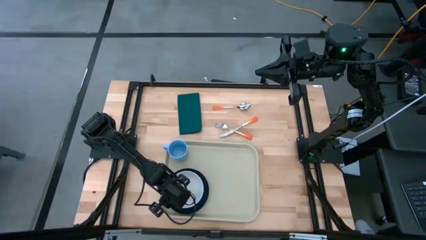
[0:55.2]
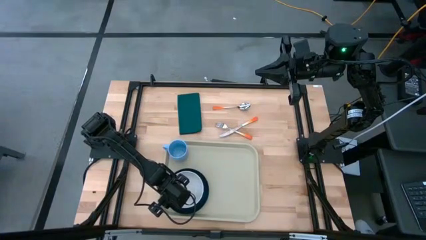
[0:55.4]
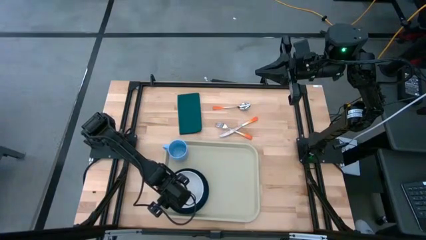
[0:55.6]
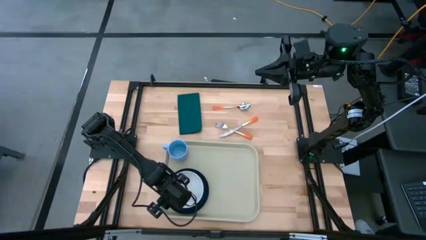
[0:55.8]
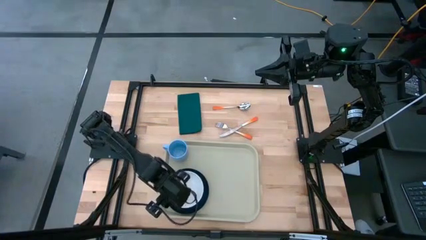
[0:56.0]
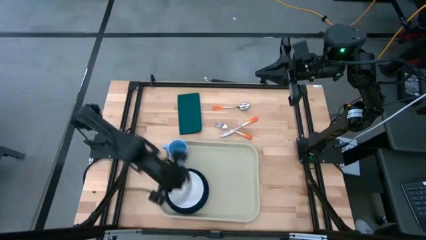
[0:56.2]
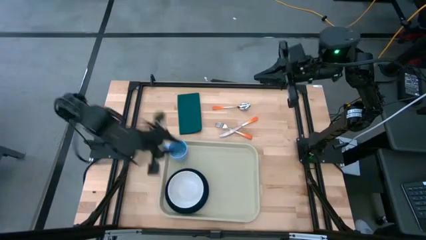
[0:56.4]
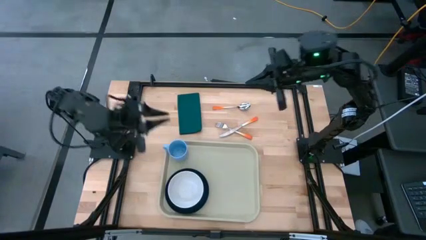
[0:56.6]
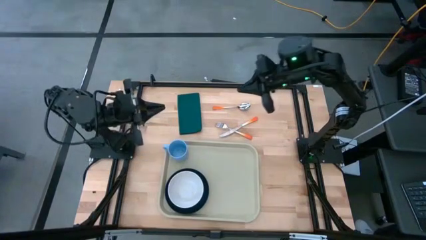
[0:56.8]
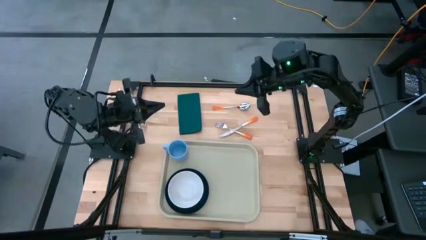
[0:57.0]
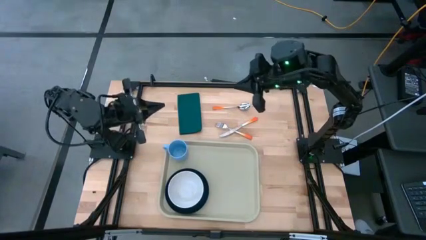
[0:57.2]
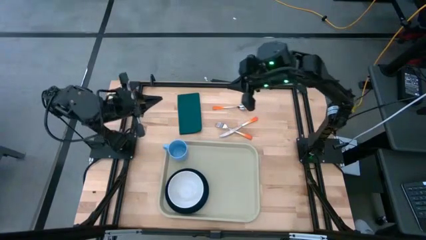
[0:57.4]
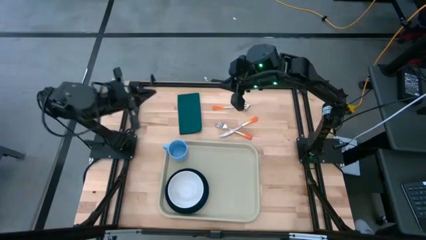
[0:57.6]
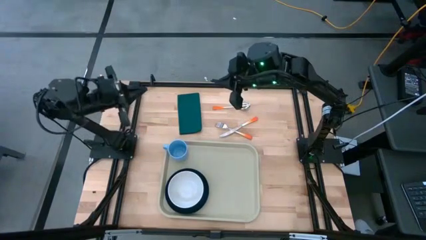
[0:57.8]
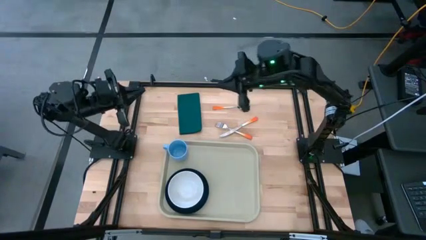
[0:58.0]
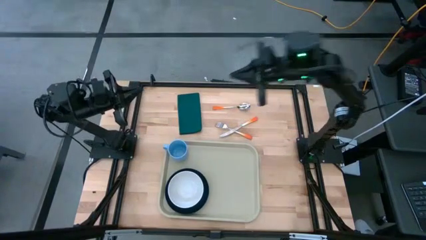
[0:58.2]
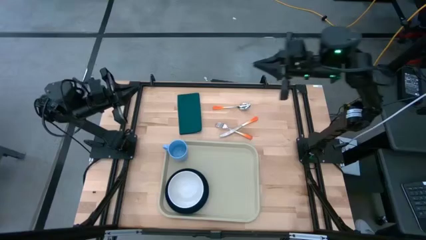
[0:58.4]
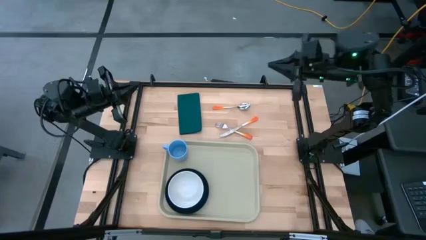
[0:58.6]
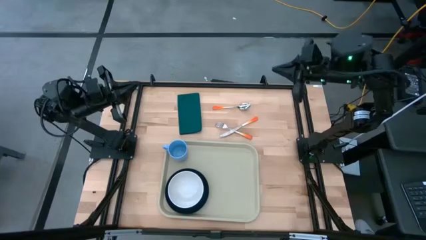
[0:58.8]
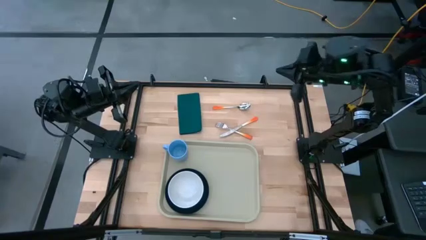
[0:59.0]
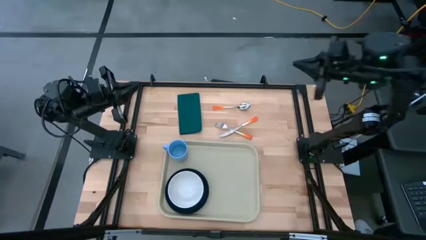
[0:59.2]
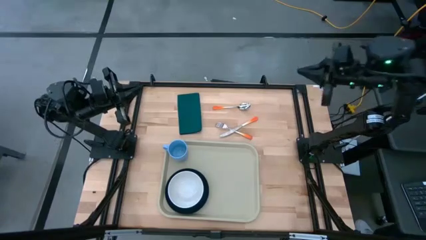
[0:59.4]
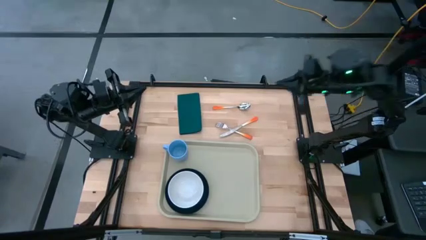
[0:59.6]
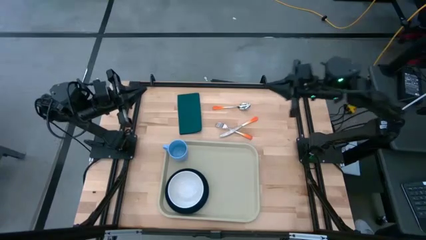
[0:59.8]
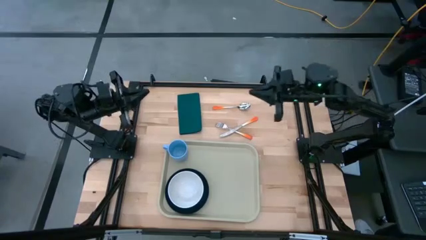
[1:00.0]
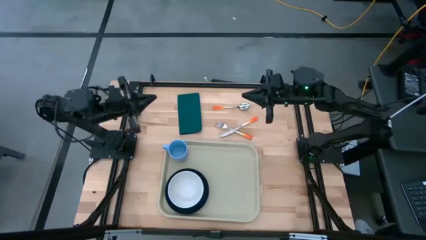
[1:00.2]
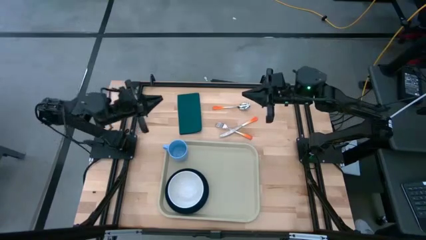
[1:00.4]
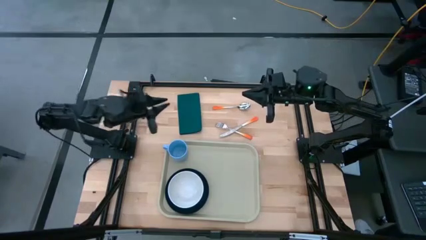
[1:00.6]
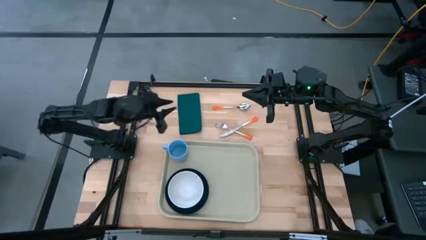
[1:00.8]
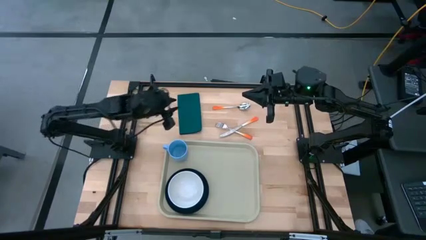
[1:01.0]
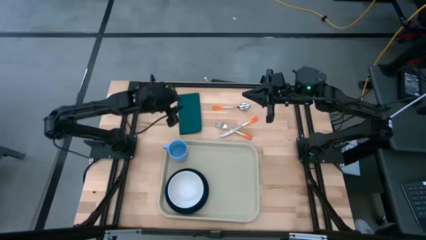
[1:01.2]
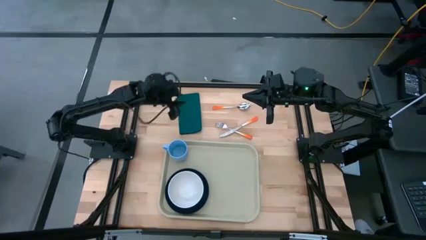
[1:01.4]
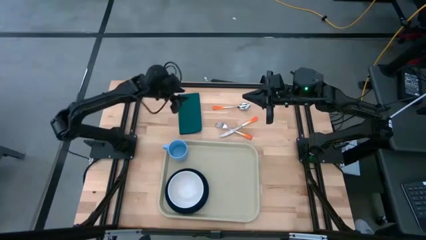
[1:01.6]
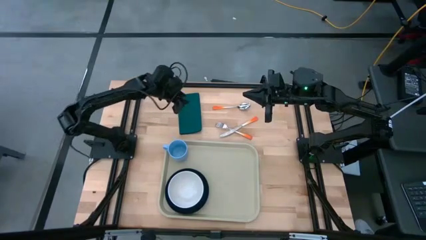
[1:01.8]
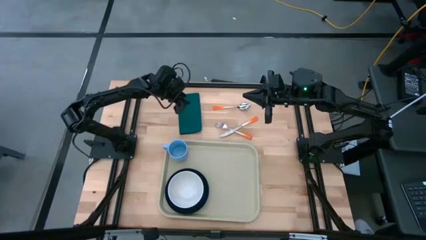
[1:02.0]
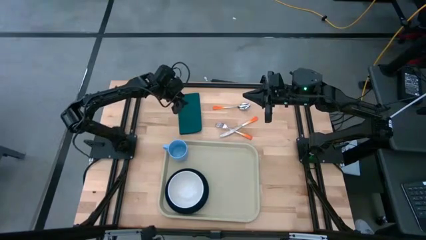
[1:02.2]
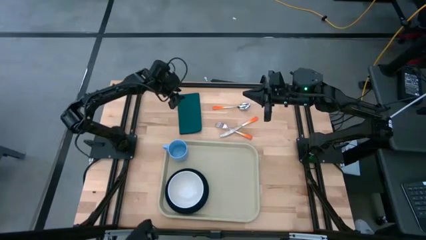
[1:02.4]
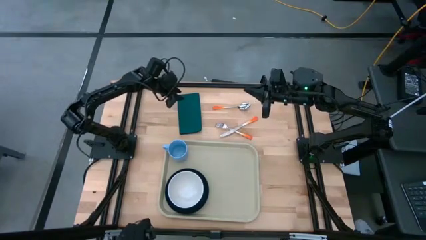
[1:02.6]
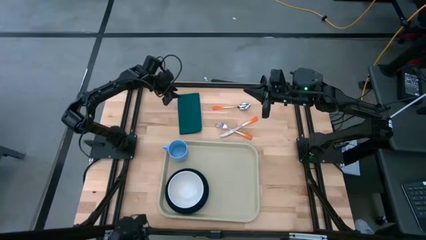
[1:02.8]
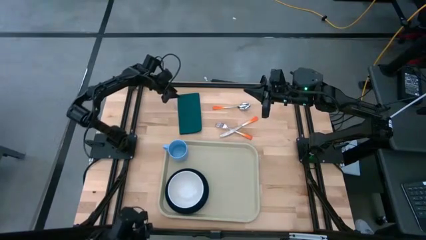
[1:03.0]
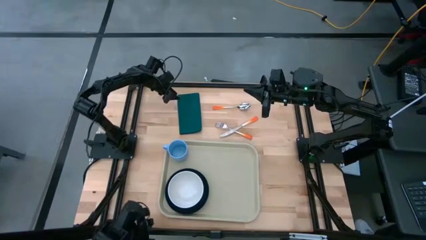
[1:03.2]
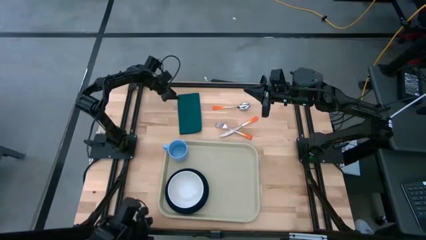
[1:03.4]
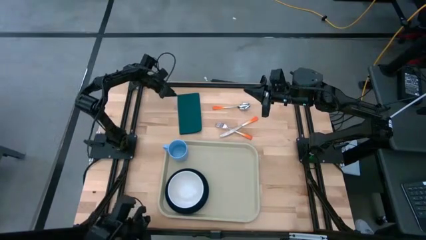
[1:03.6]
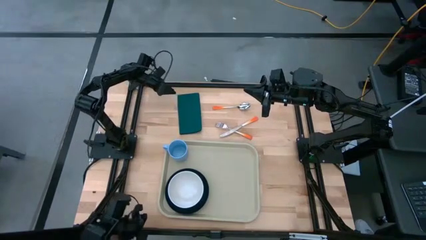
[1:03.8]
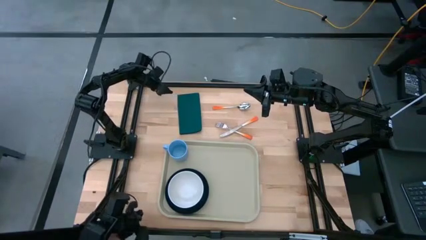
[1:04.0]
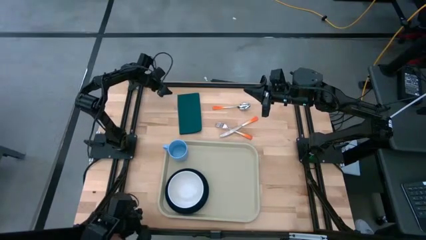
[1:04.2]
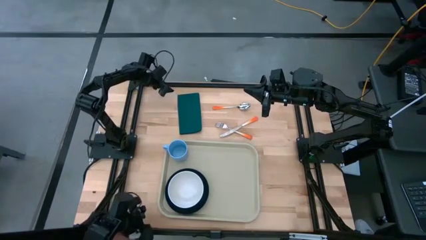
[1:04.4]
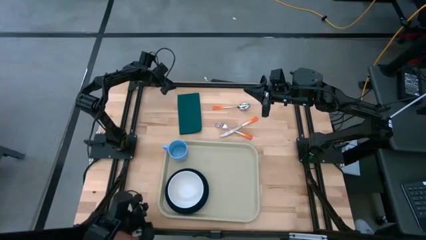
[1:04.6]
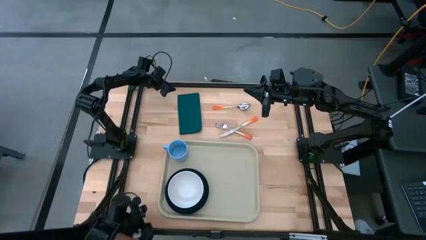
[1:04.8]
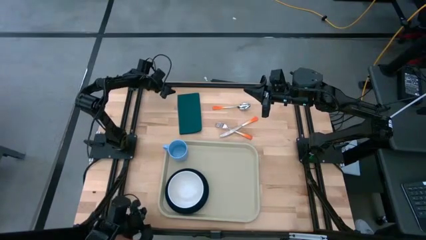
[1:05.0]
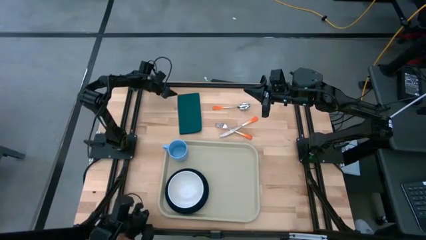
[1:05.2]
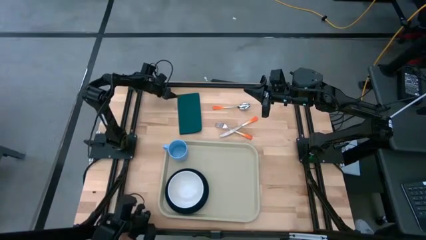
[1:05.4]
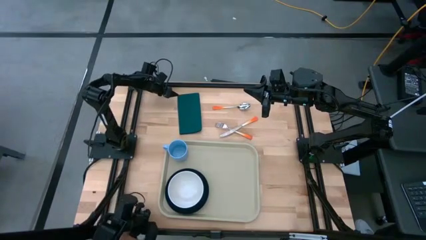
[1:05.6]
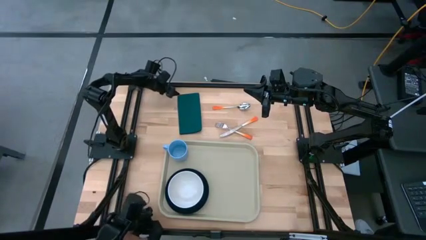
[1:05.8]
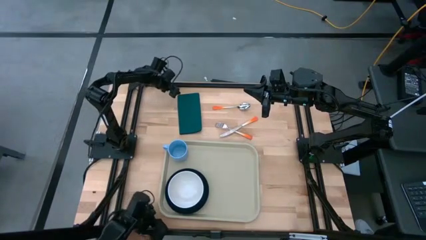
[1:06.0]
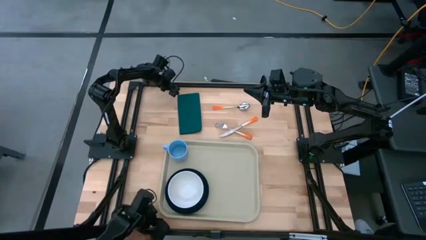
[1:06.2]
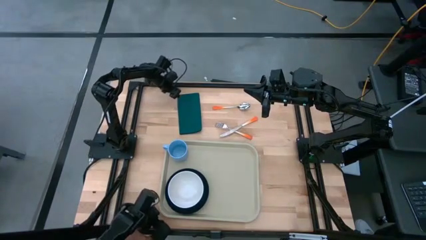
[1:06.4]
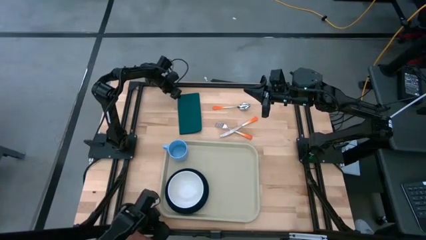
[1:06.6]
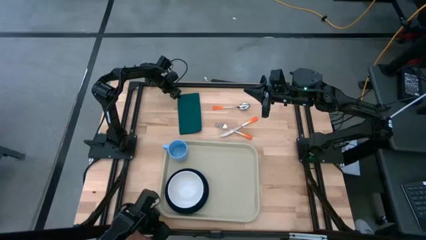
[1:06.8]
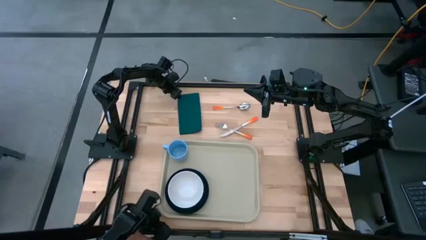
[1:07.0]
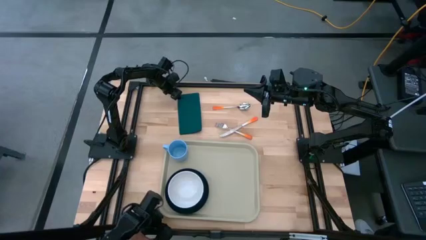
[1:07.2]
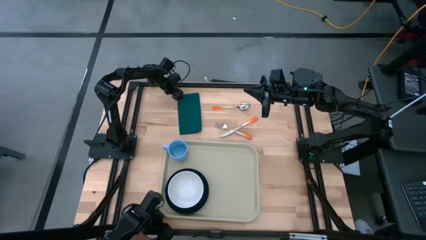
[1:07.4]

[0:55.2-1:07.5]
Task: Set up tray
Put the green napkin on the gray tray to the right of the green plate
